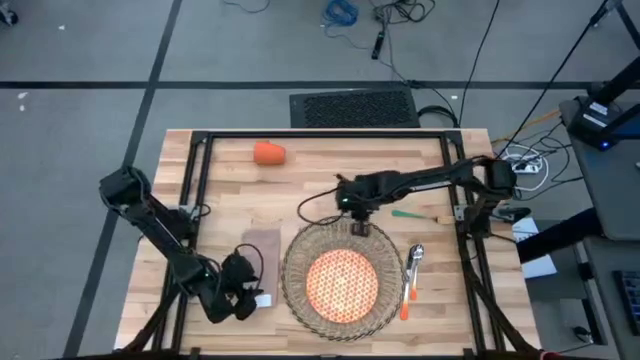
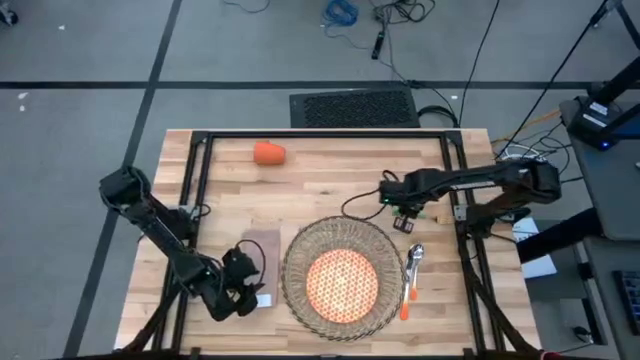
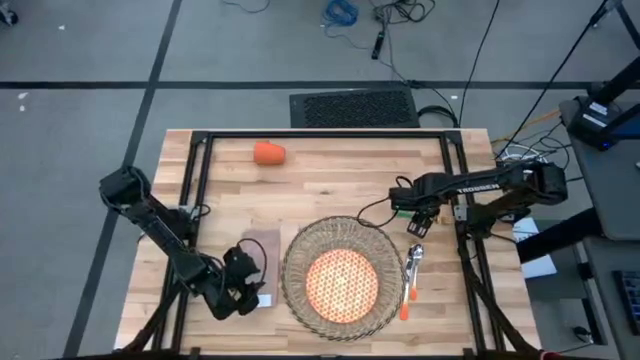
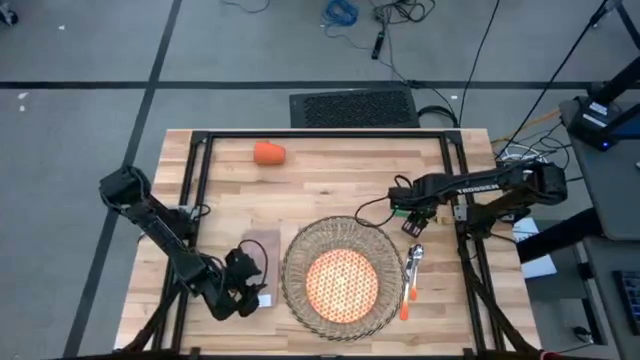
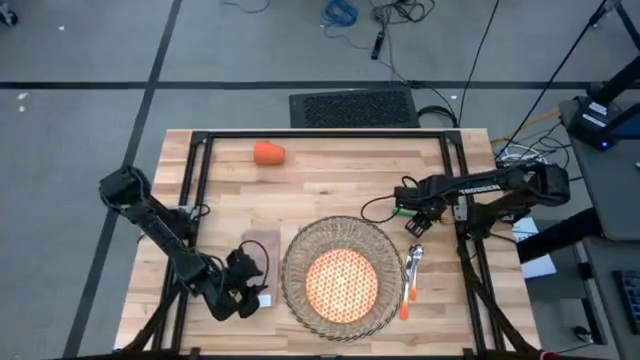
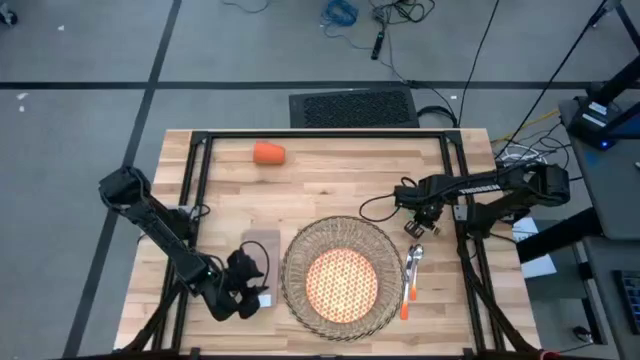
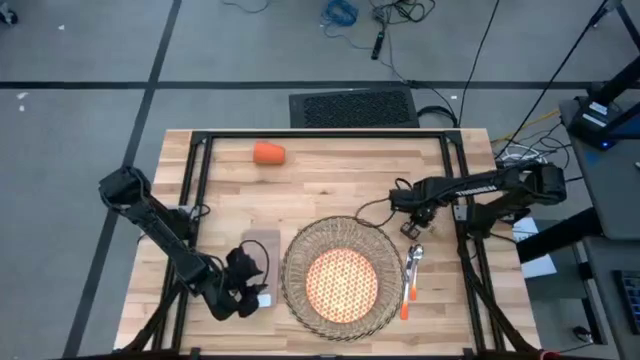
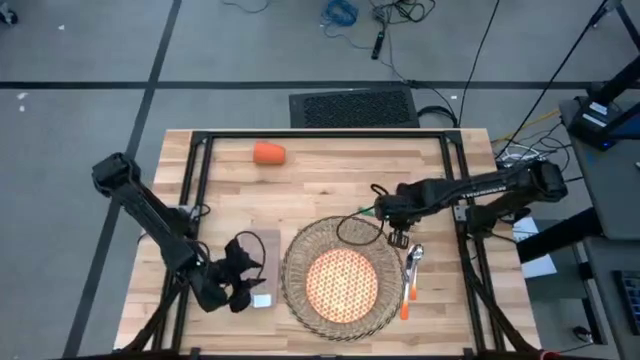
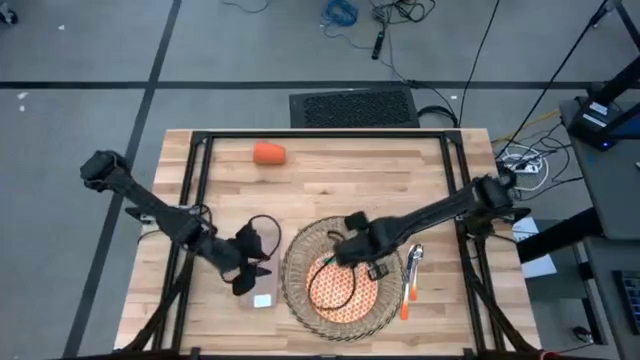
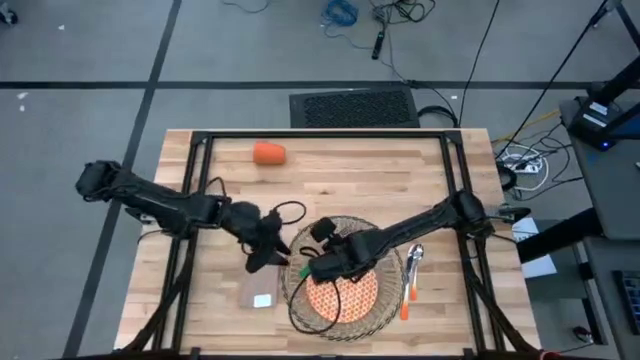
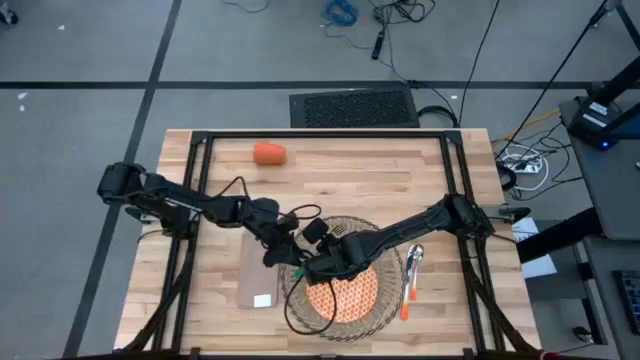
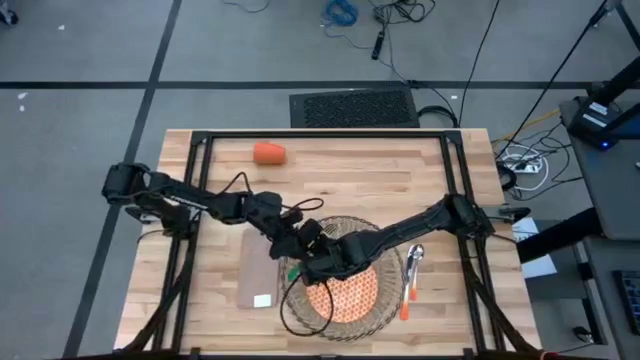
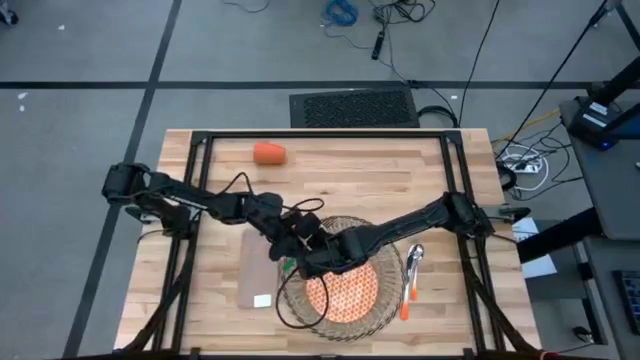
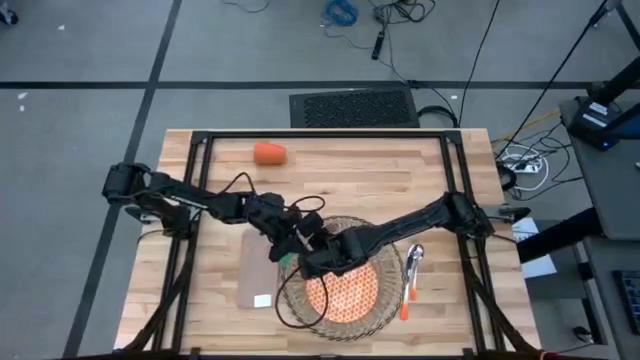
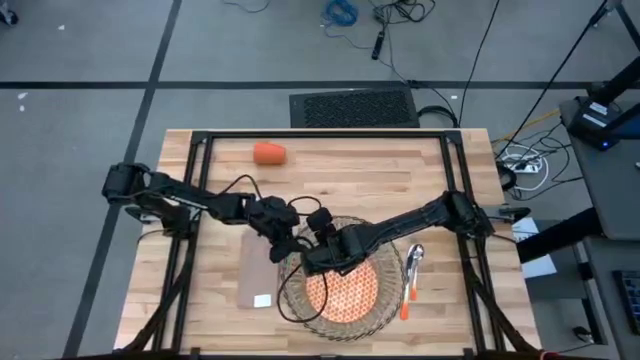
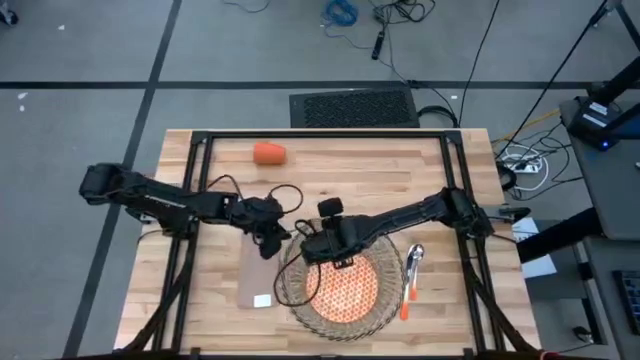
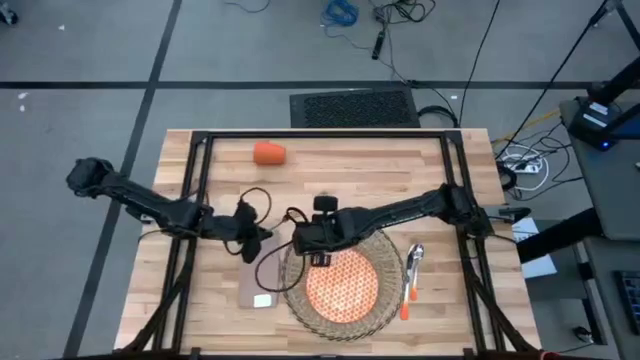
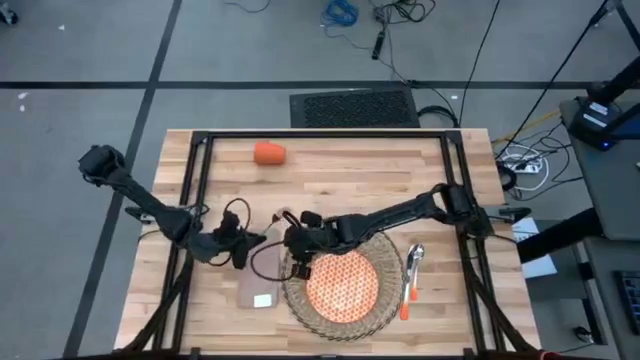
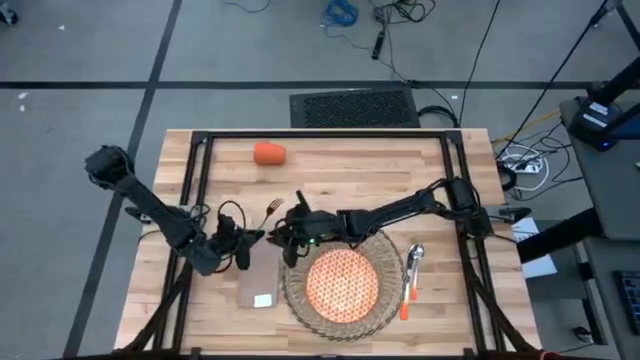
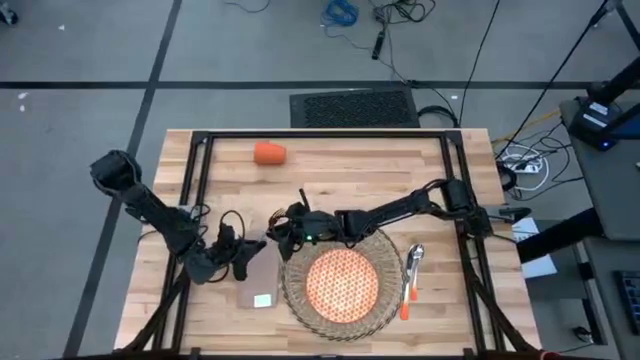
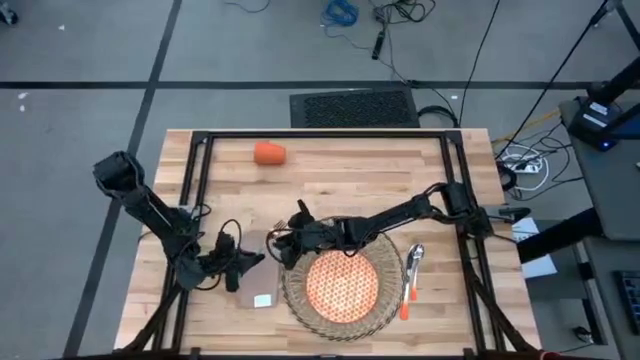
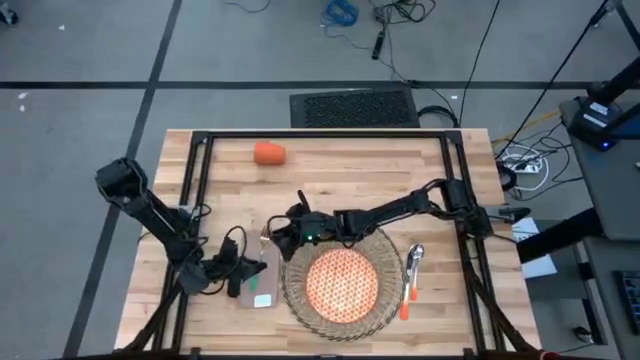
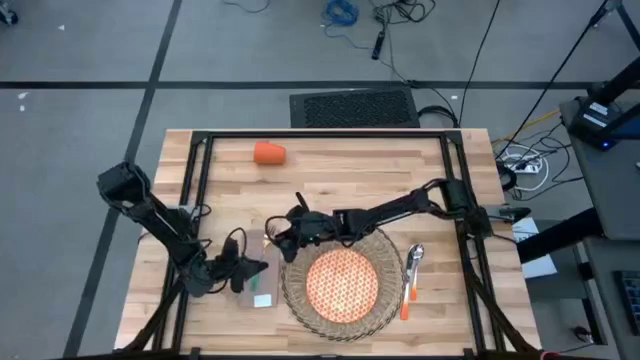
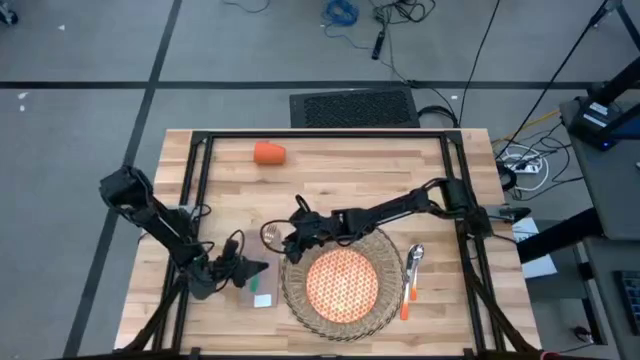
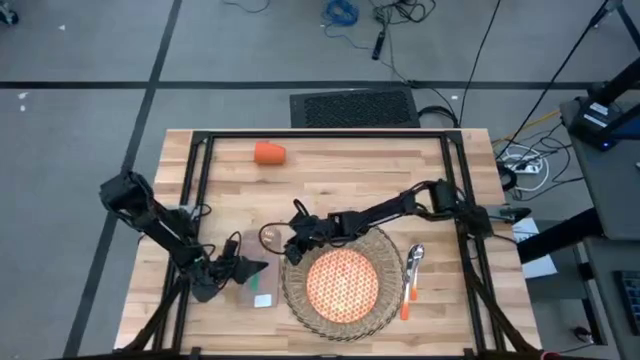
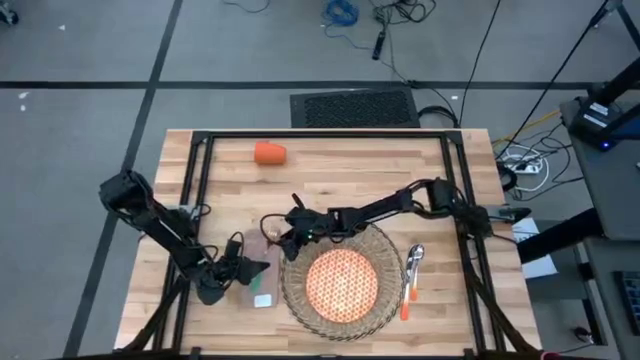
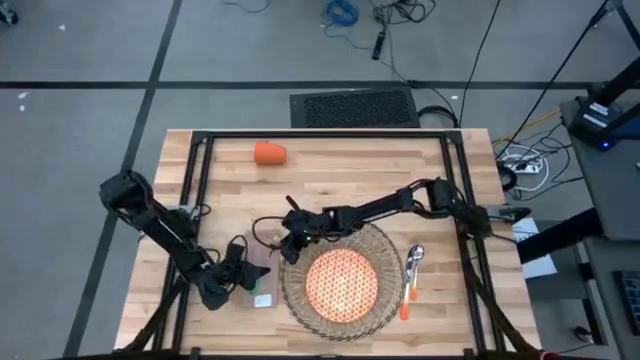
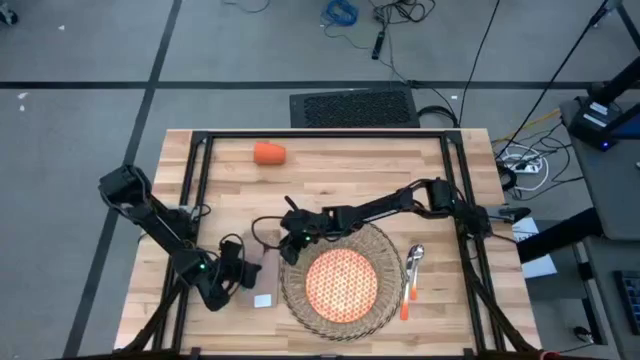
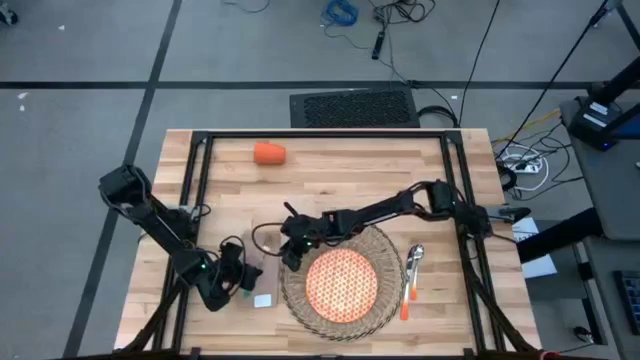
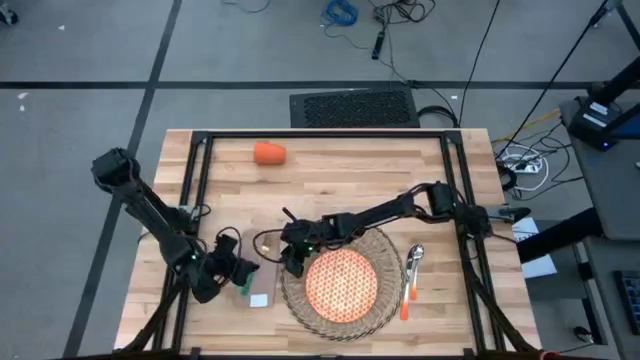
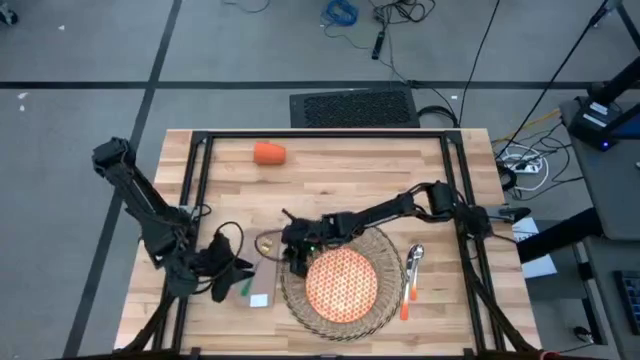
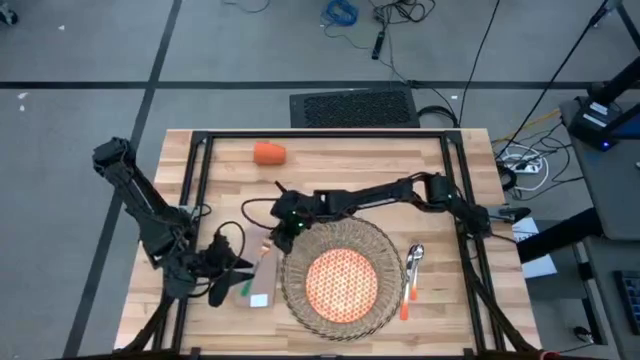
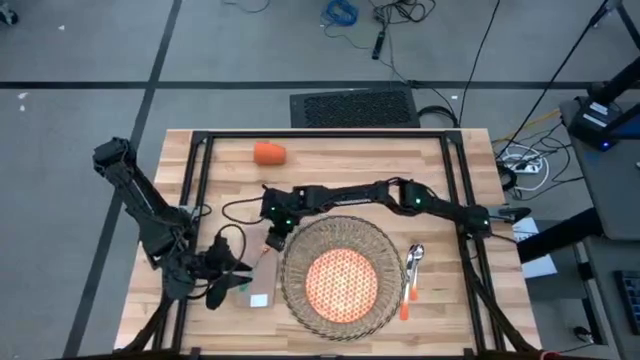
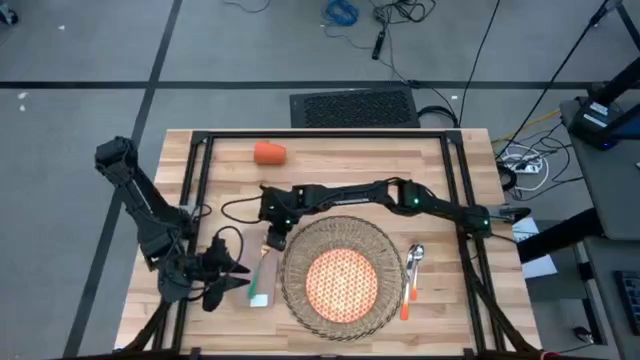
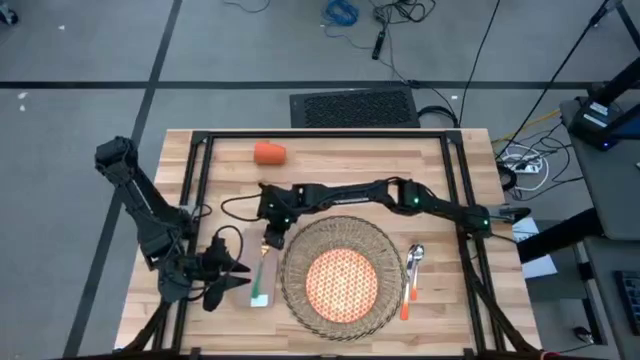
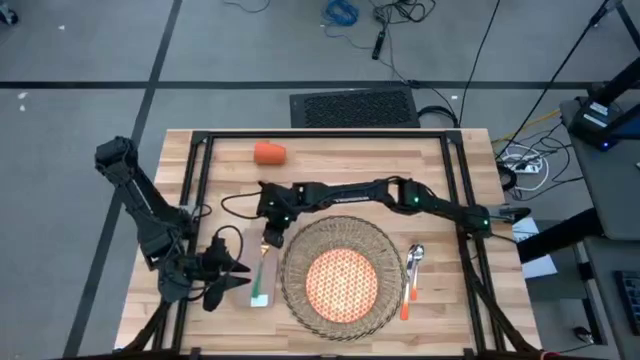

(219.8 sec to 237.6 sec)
Task: Set table place
Put the green fork on the white napkin to the left of the brown mat

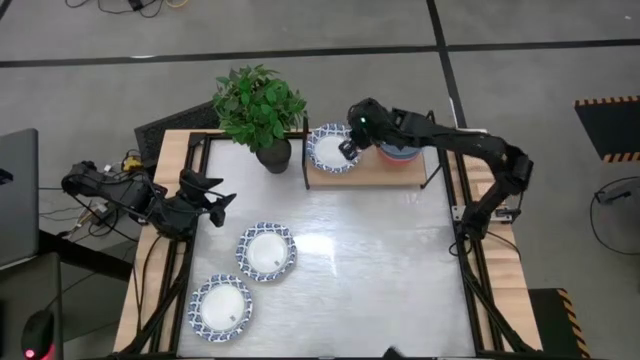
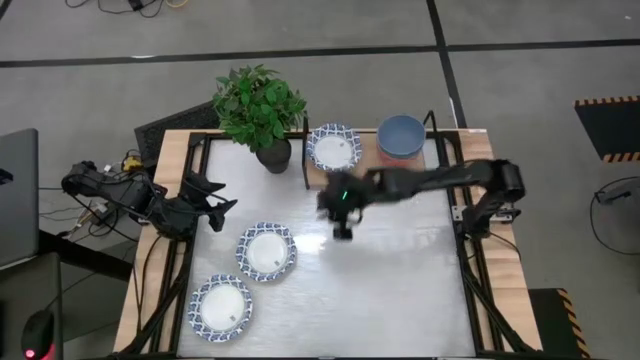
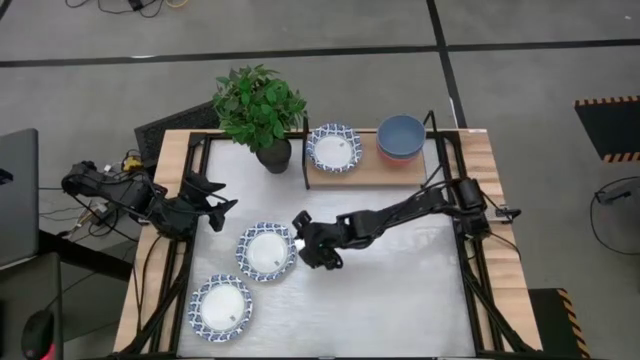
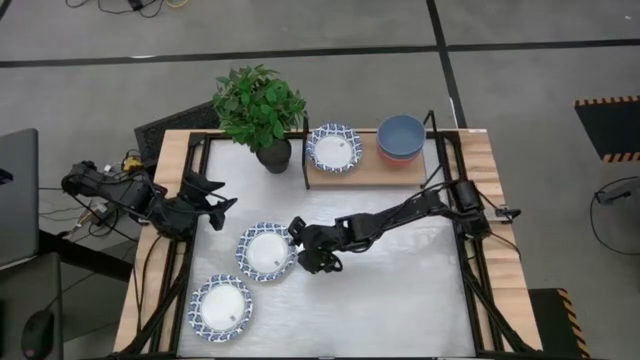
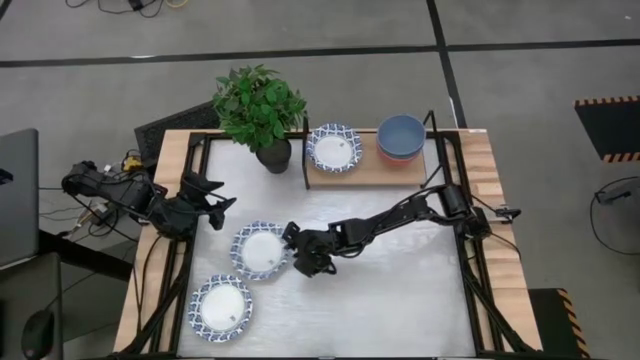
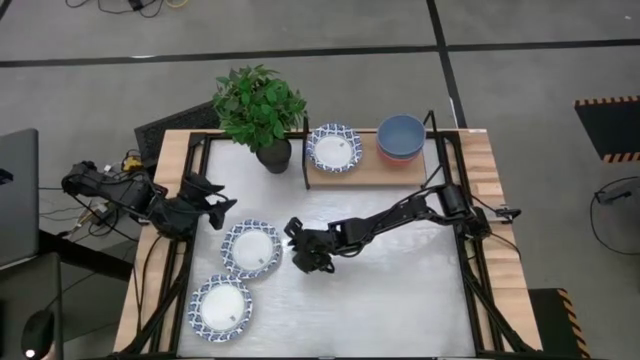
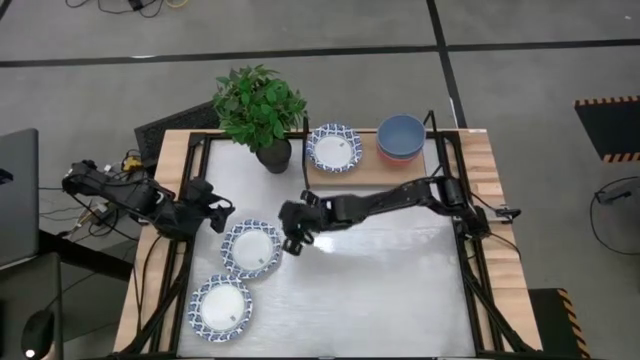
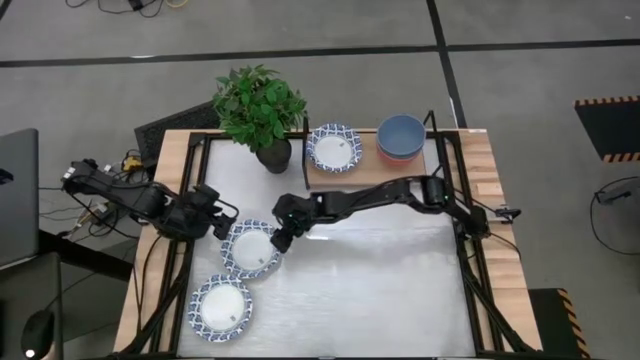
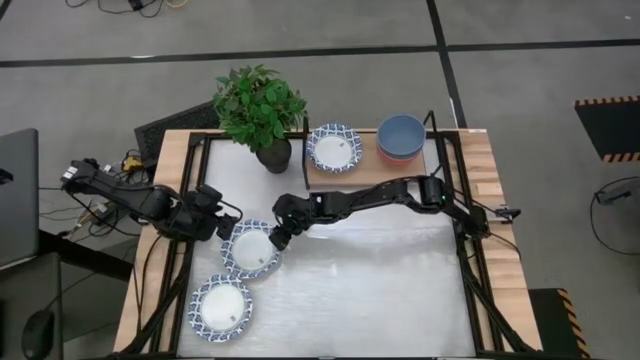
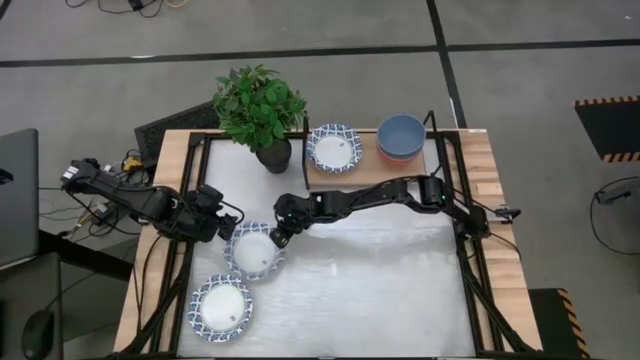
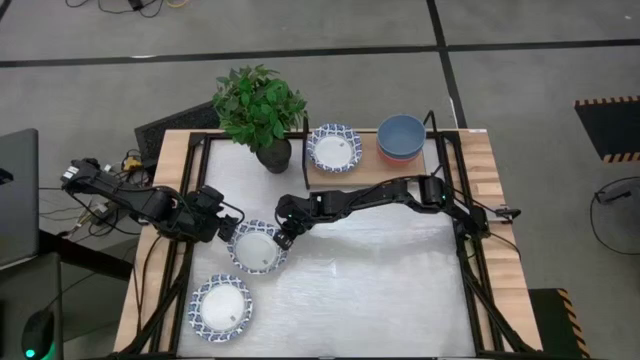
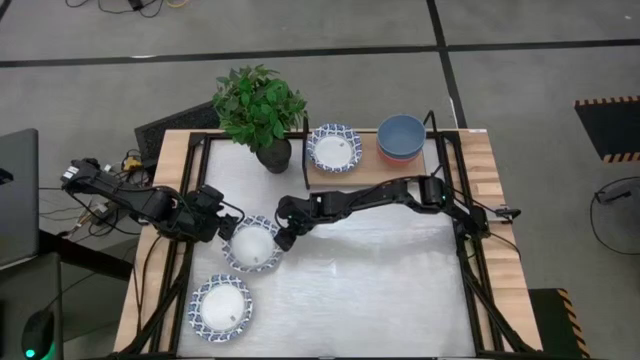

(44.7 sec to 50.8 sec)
Task: Place and stack bowls onto a shelf
Stack the white bowl on top of the white bowl on the shelf
